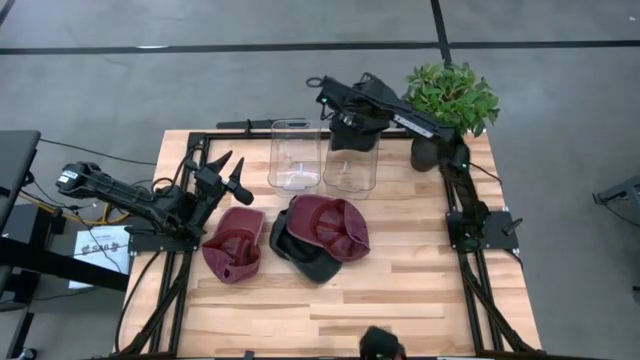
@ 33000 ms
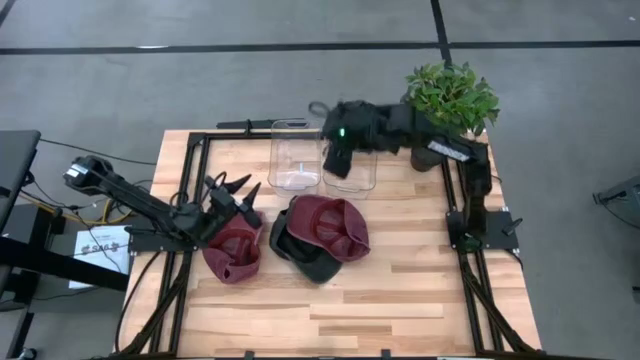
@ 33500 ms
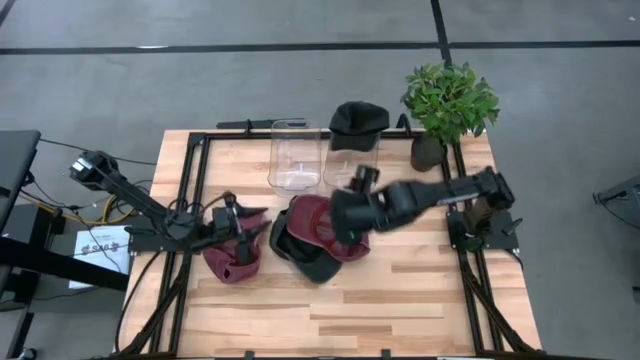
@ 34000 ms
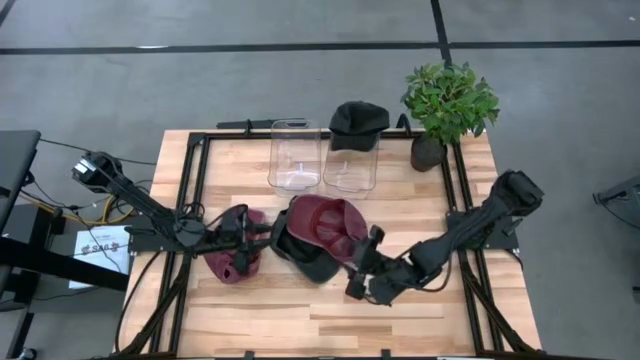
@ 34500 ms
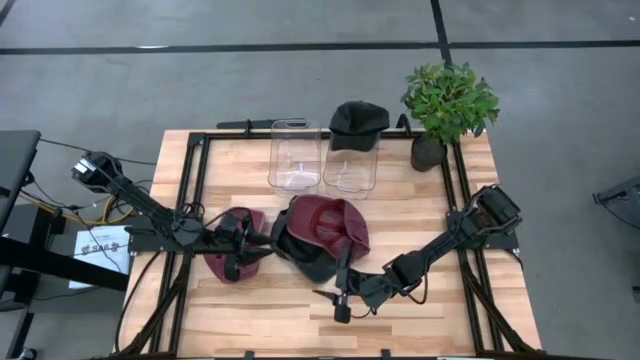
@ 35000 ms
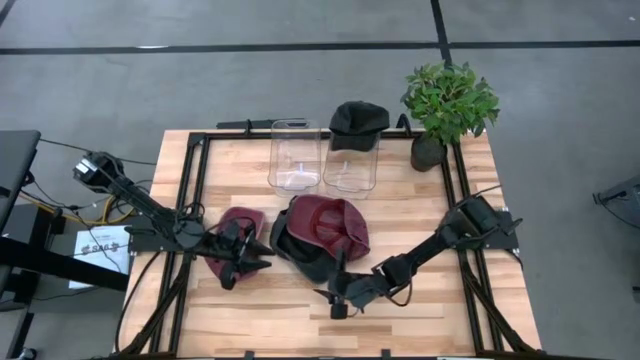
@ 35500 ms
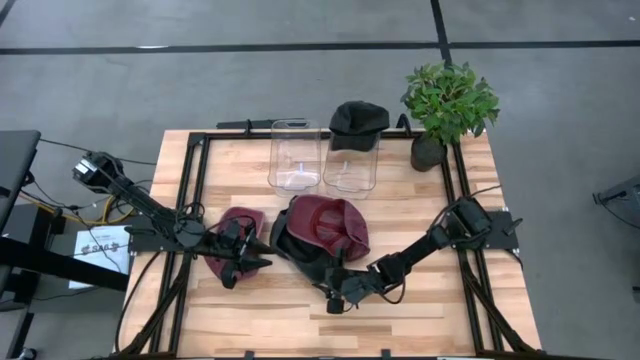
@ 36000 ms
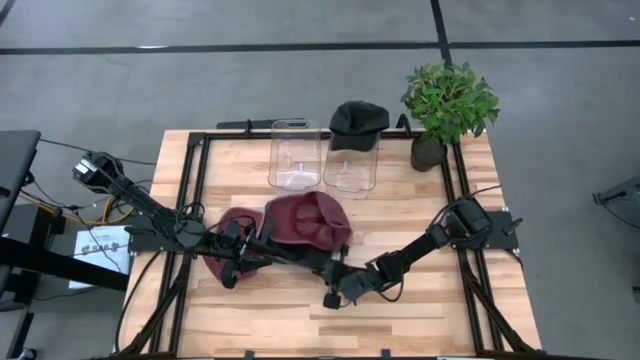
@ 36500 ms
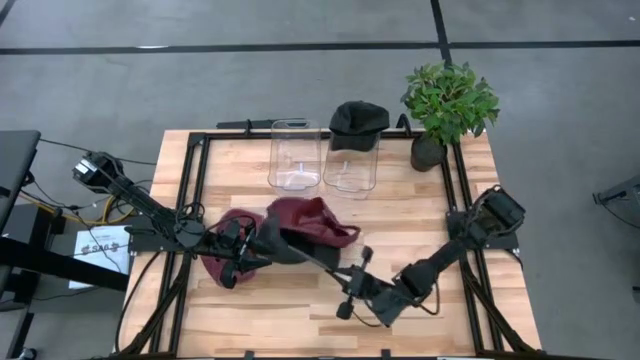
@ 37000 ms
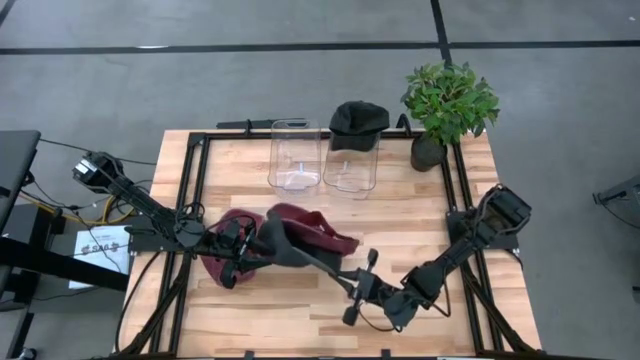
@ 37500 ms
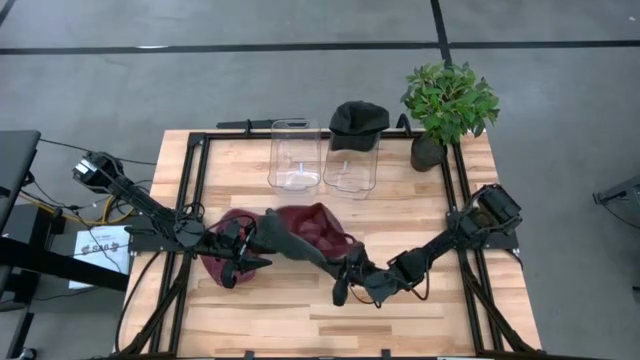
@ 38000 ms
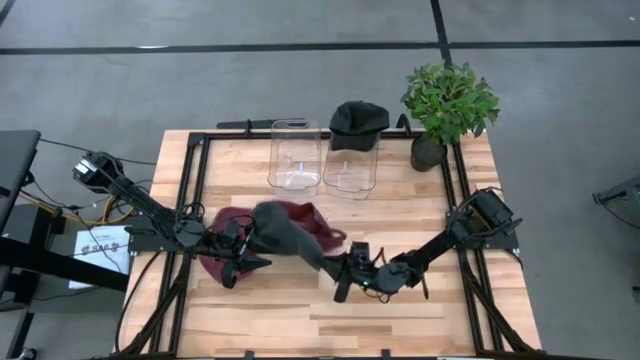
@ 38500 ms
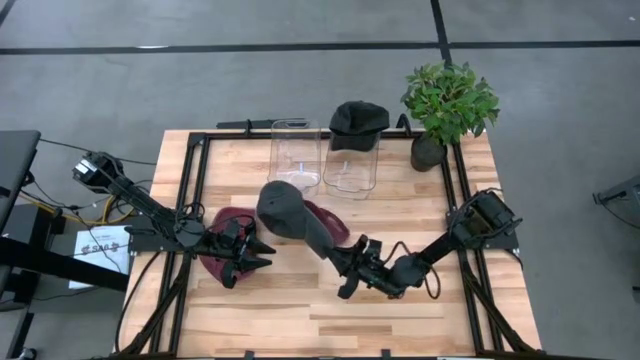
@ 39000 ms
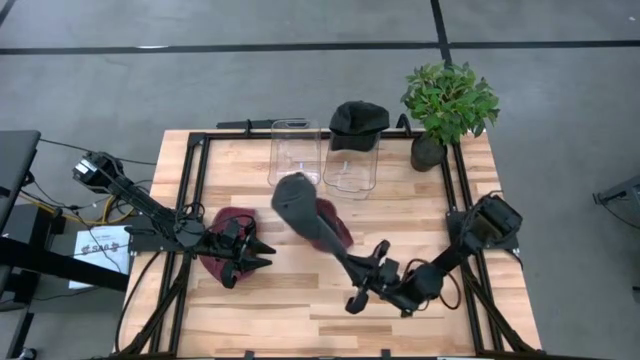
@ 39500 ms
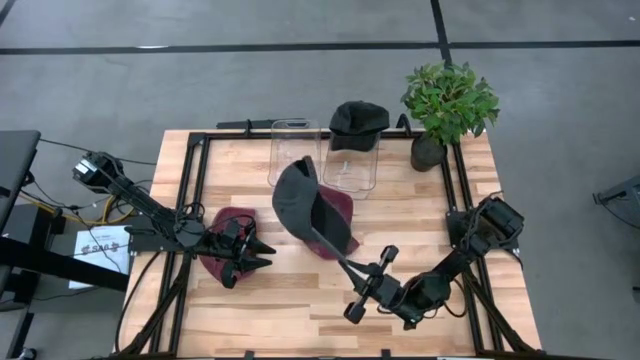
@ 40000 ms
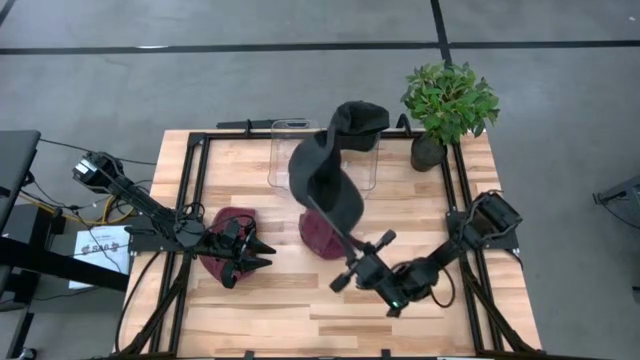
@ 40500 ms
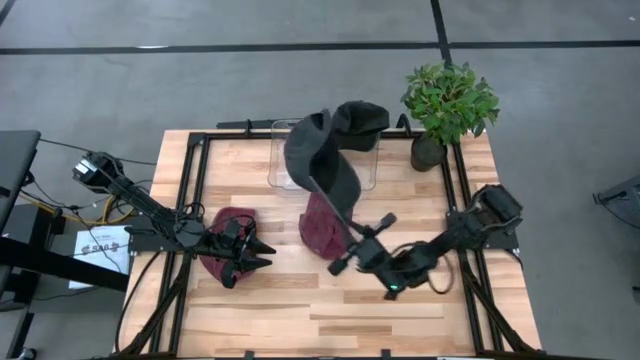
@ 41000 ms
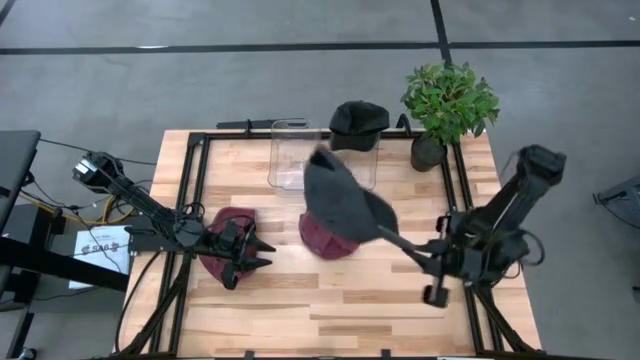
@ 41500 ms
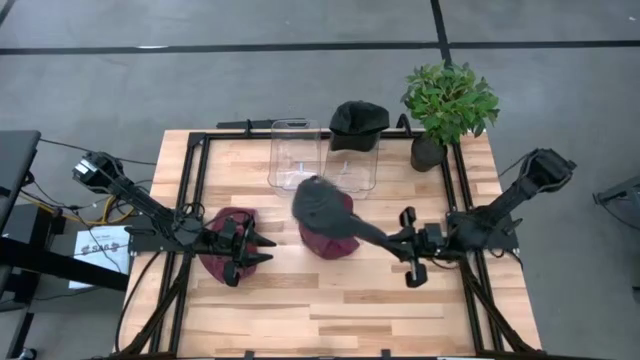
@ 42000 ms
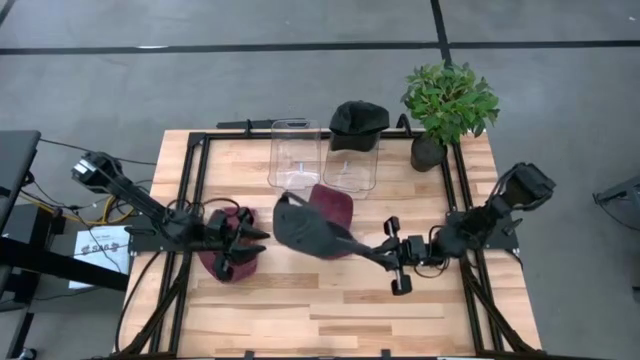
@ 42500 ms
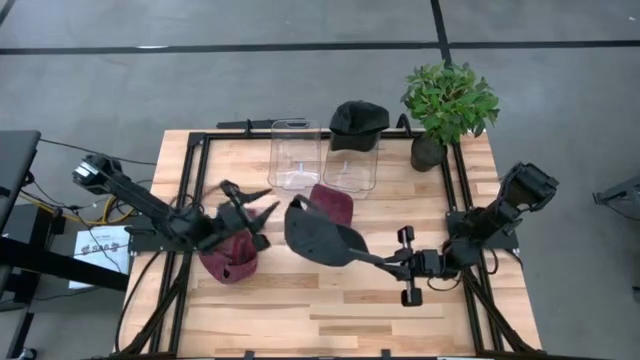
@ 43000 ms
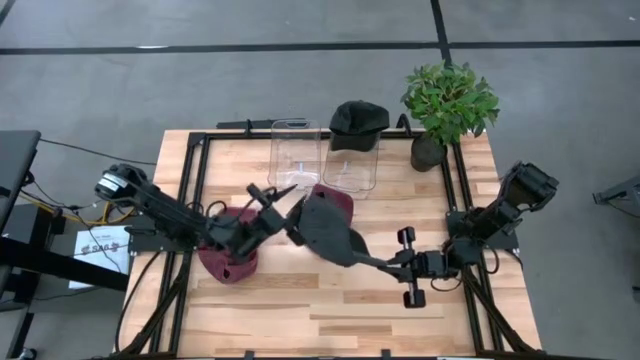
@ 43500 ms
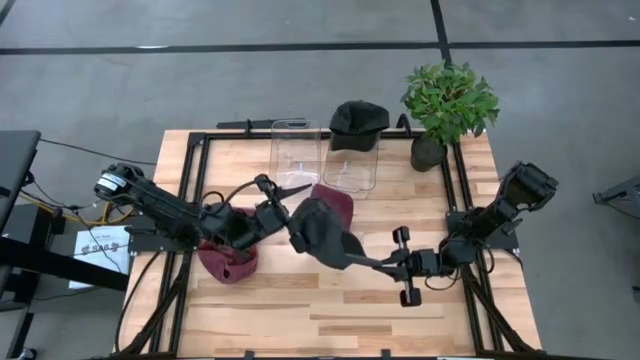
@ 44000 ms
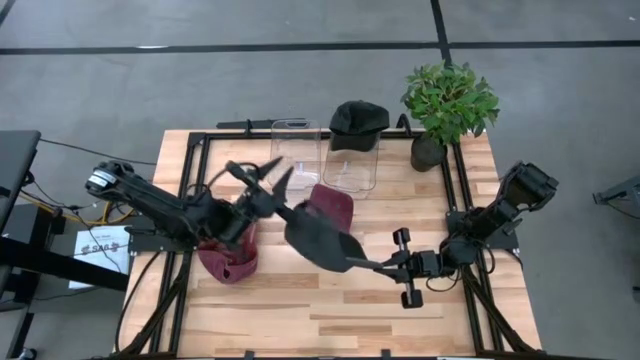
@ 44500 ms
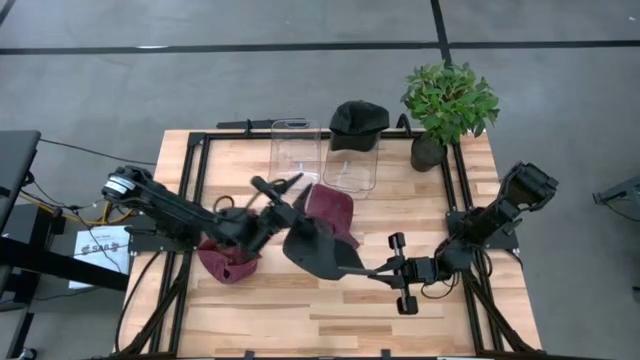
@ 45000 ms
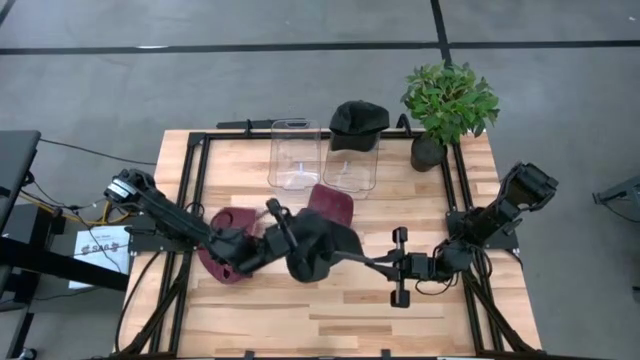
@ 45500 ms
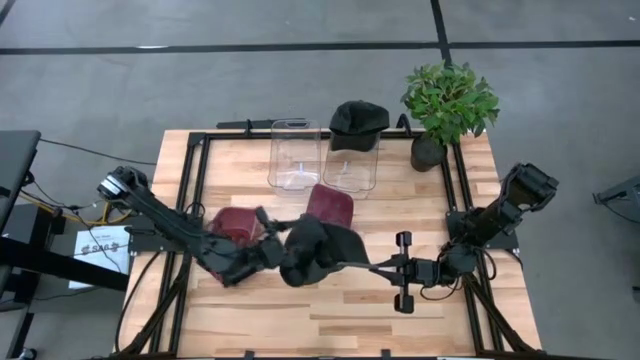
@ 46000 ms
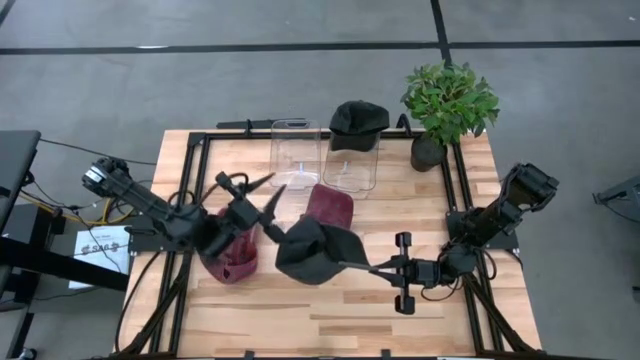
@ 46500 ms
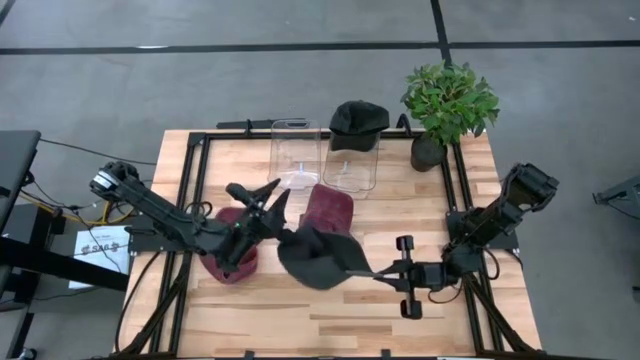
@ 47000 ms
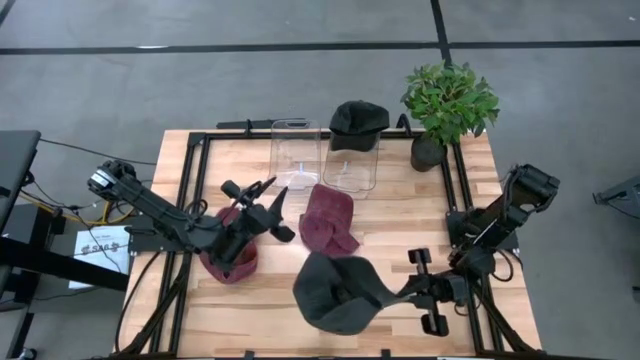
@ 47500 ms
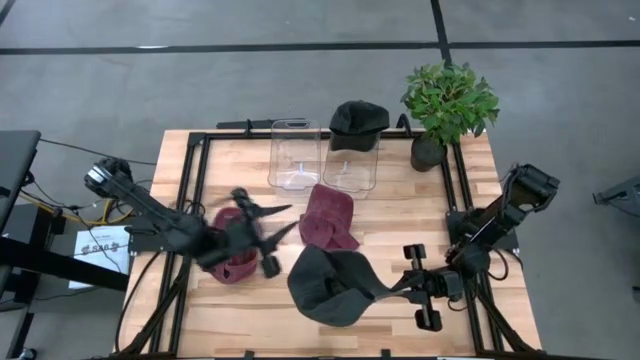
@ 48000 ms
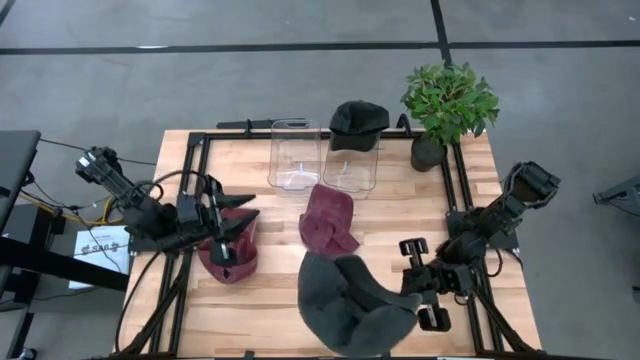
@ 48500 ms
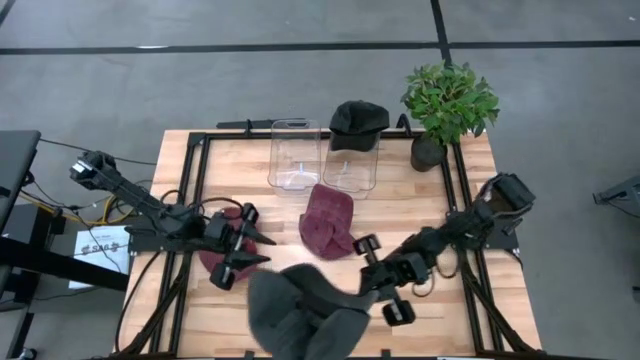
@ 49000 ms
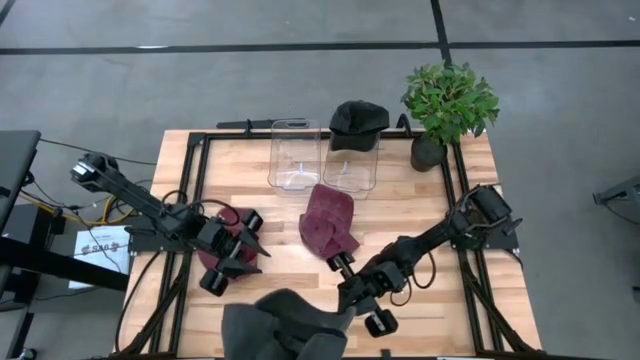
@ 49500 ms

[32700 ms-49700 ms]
Task: Pick & Place hat
Put the black cap into the right transparent bin
